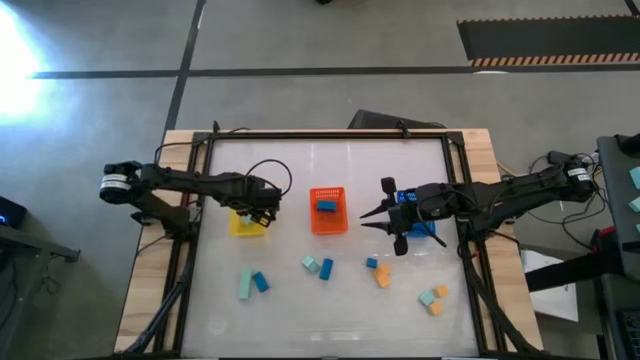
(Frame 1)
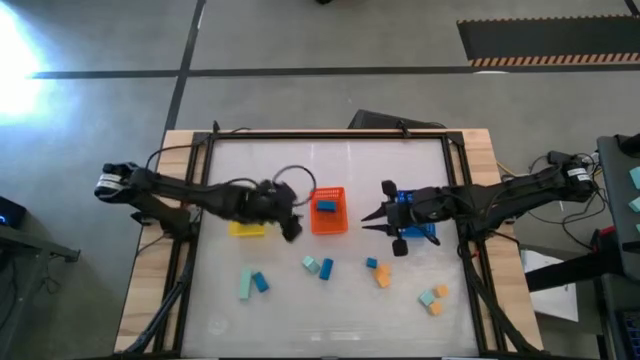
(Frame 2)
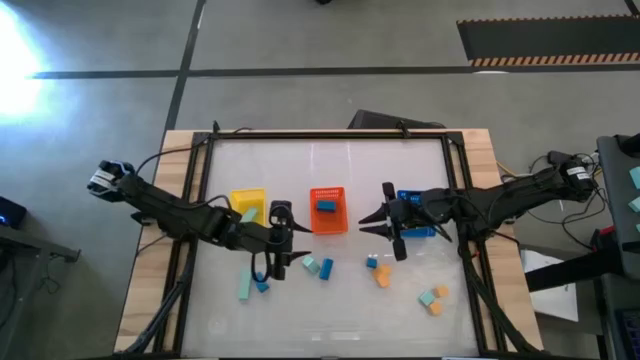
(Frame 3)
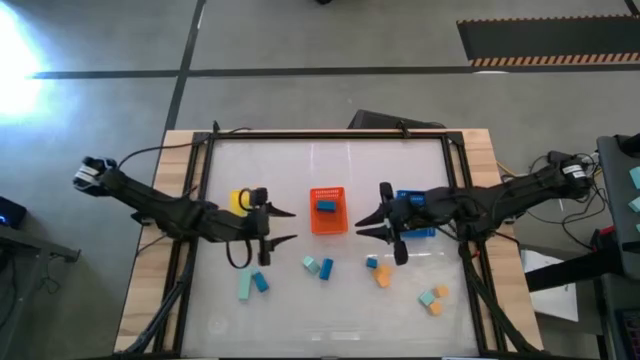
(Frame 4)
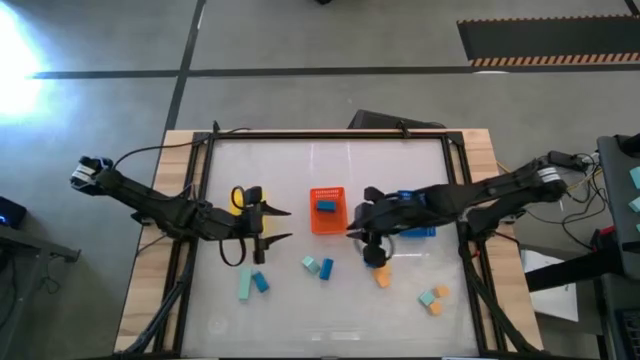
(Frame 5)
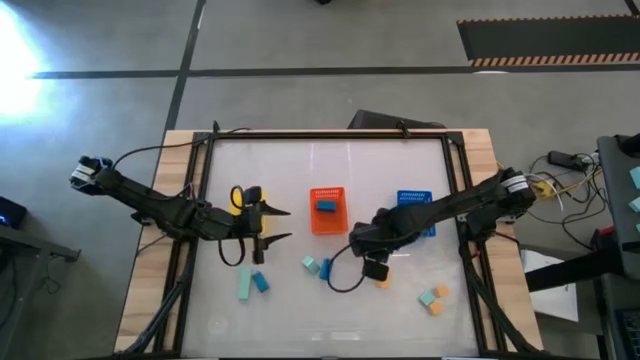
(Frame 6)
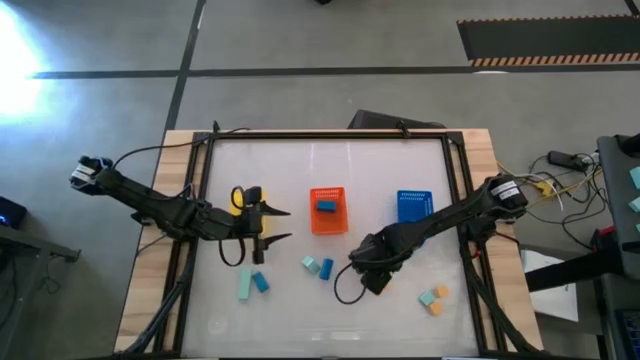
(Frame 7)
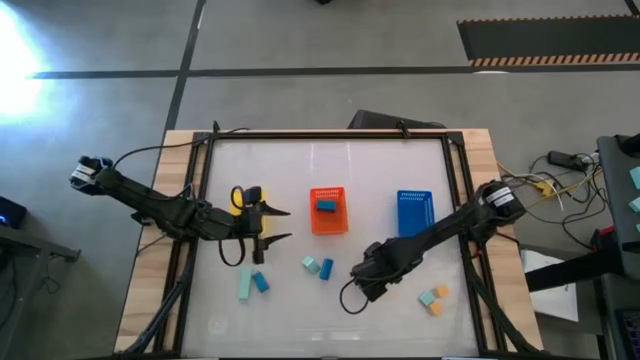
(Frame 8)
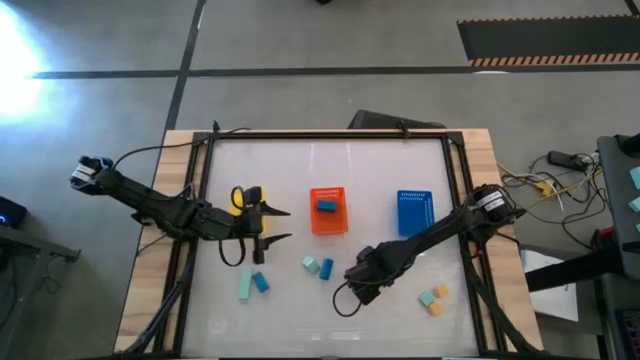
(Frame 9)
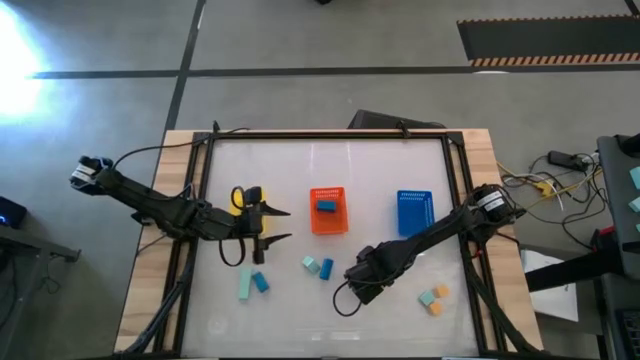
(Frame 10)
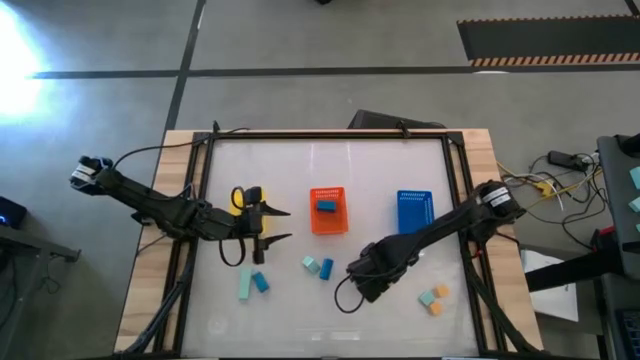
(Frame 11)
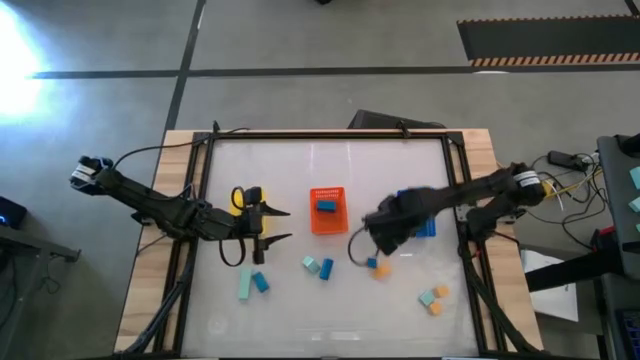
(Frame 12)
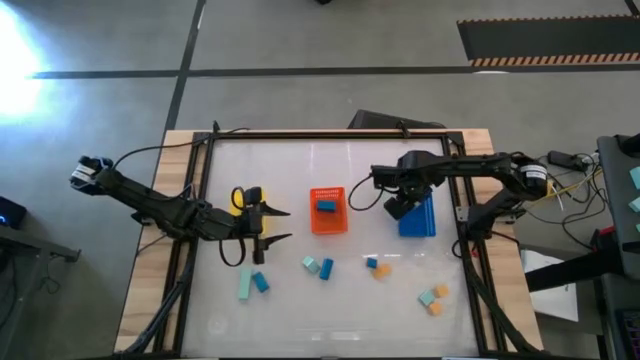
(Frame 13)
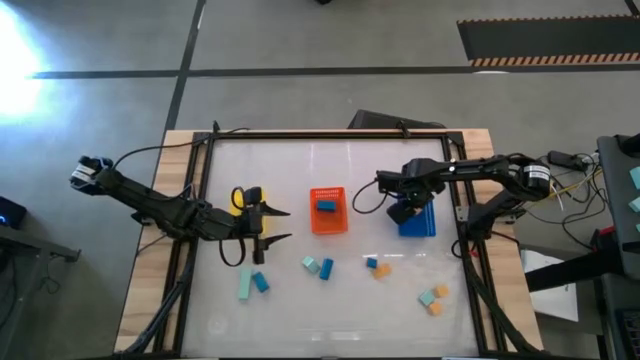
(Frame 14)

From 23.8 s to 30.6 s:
Task: Sort & place blocks by color
Put the yellow block into the blue bin

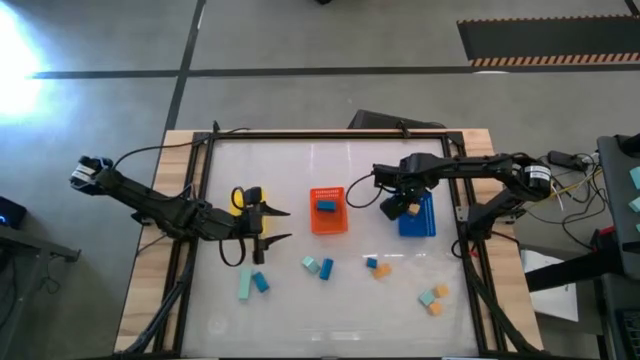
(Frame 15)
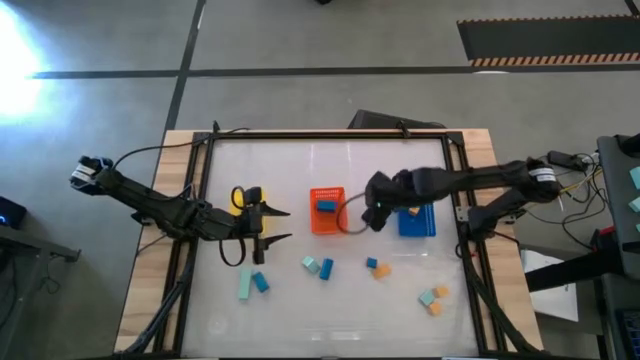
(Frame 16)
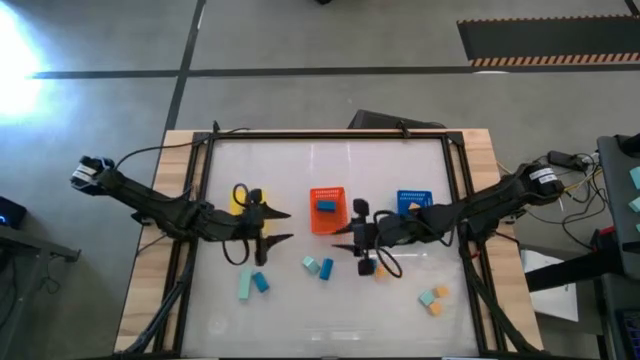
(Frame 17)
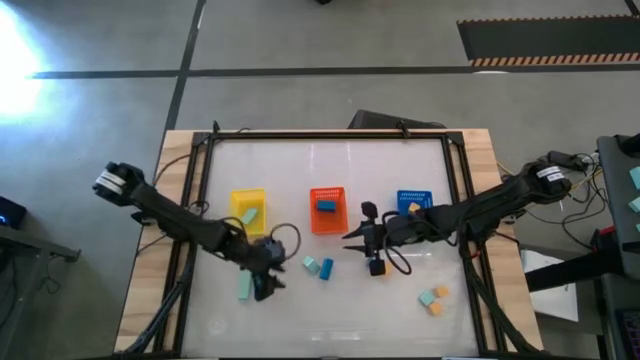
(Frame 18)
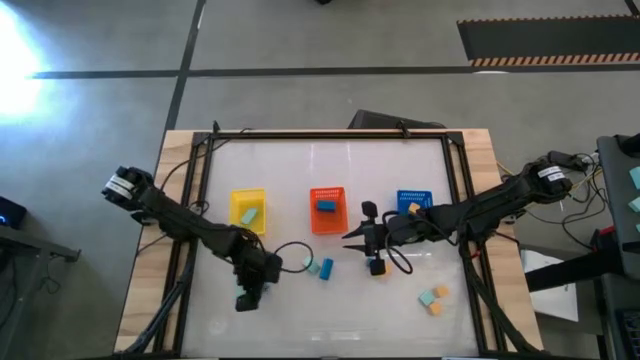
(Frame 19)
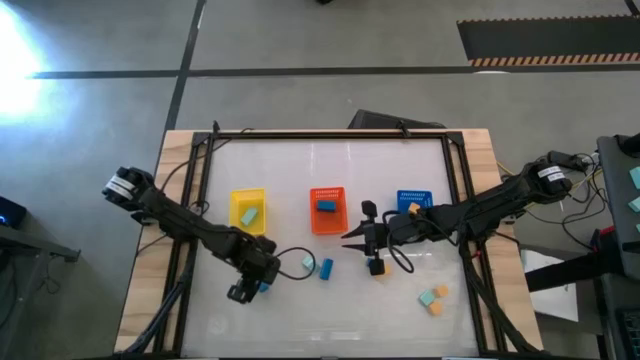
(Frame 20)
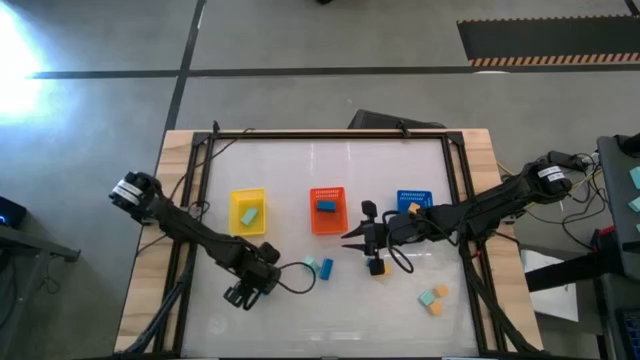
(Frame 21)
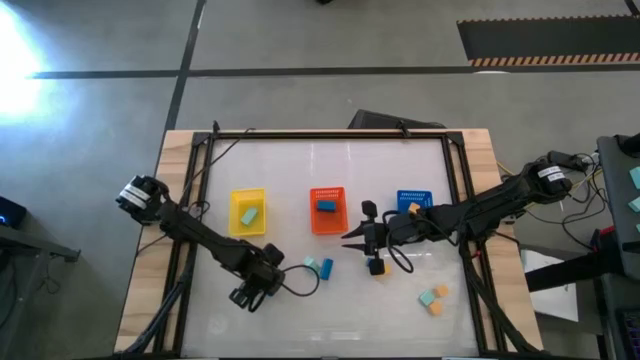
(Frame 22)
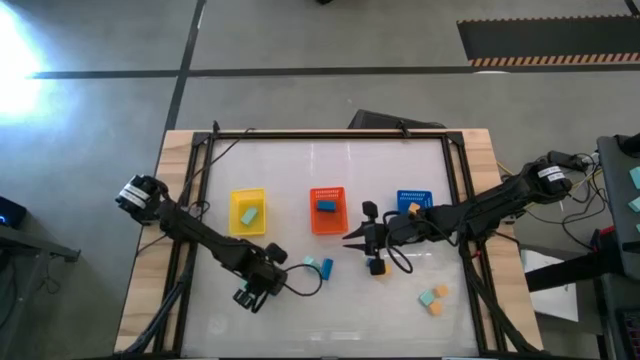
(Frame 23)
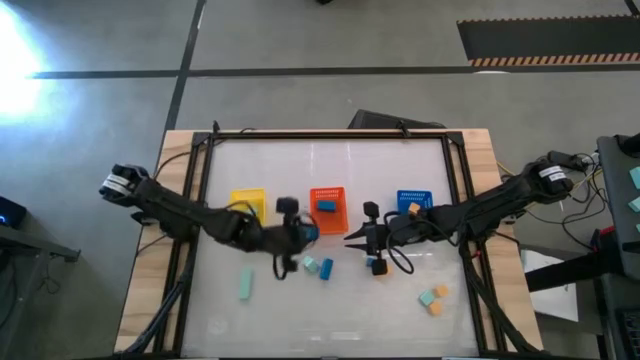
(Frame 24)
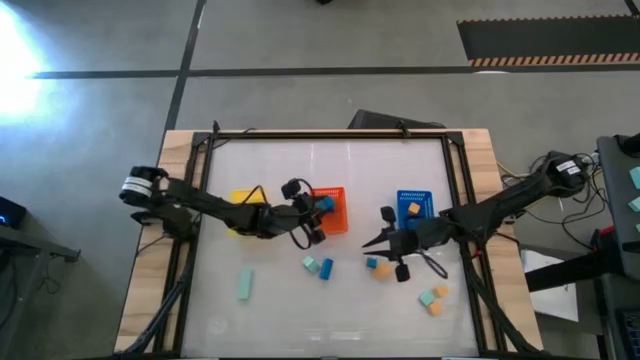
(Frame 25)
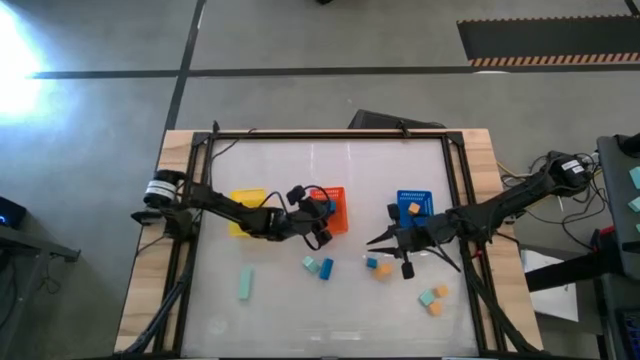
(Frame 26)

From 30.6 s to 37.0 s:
Put the blue block into the orange bin

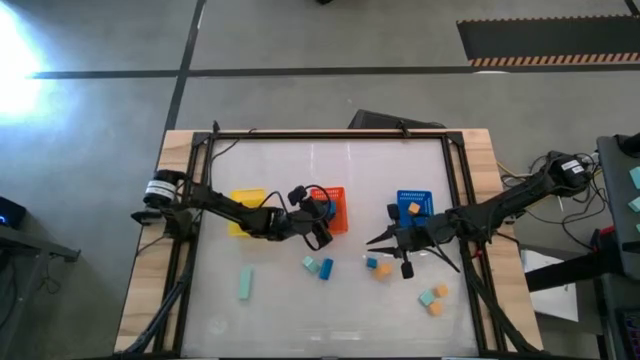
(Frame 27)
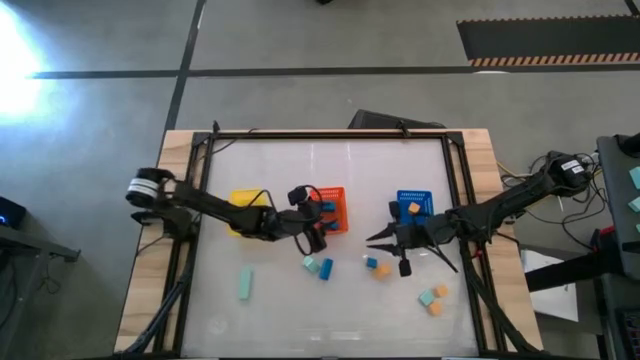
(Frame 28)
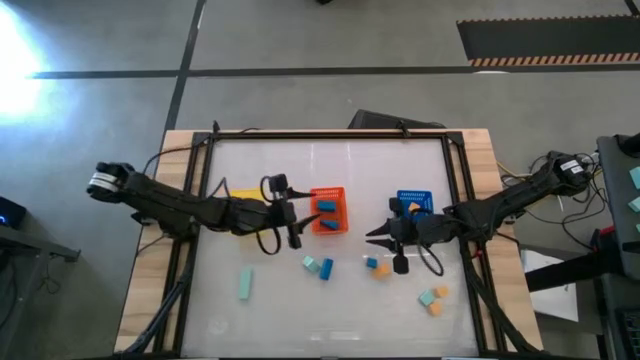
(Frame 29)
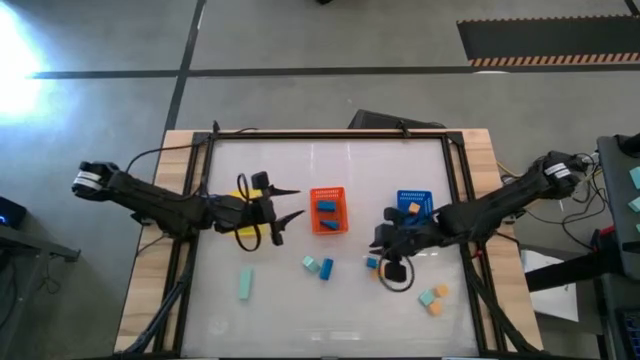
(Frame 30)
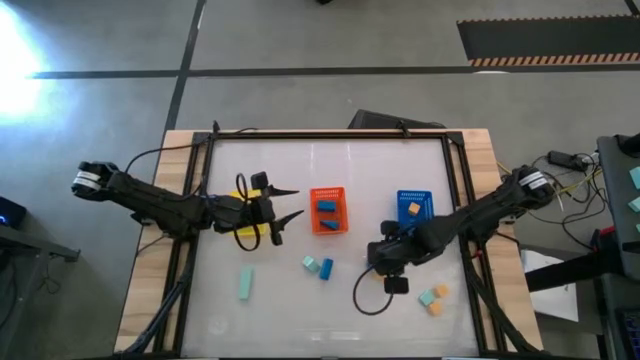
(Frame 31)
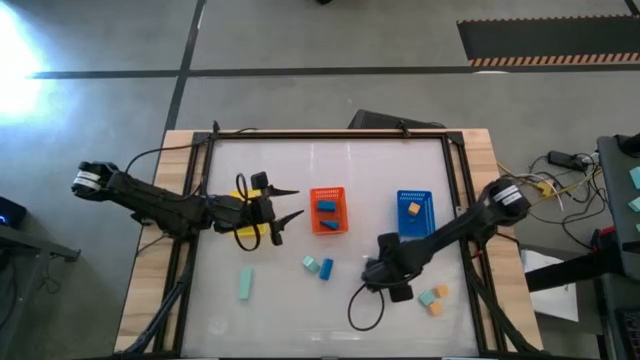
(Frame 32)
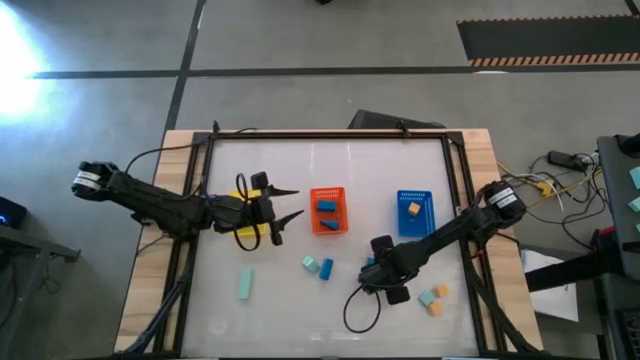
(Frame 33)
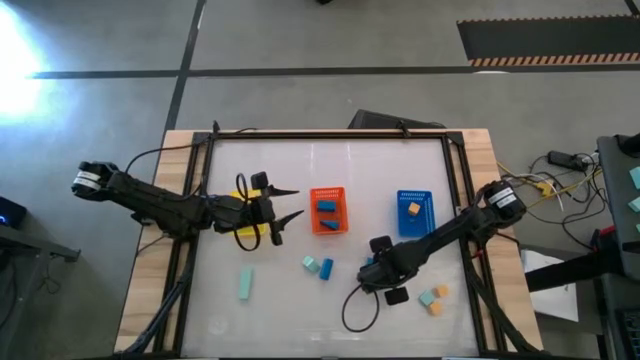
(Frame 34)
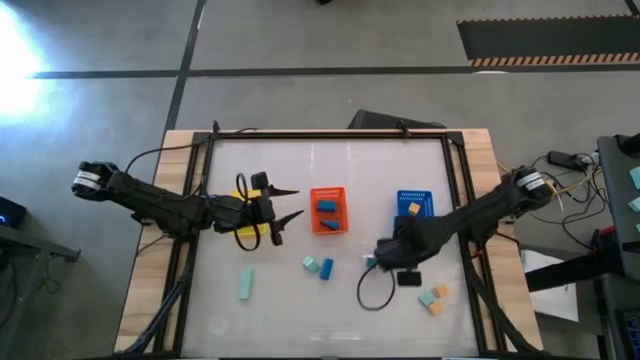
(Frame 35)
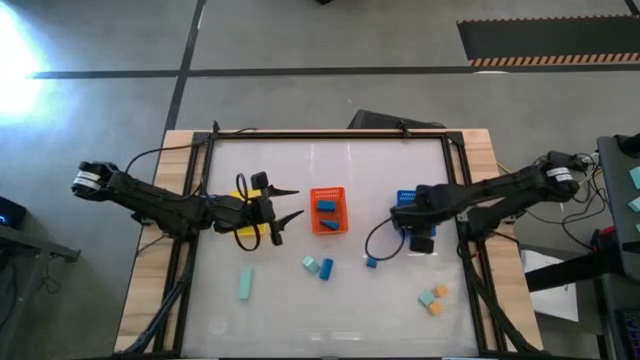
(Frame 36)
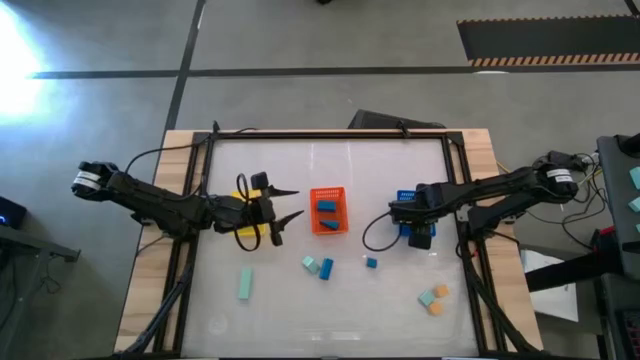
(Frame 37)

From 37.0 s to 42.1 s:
Put the yellow block into the blue bin

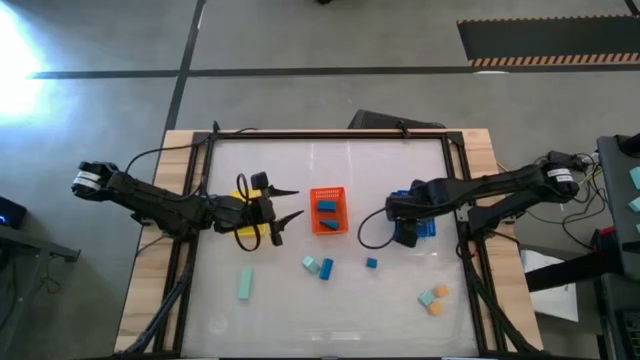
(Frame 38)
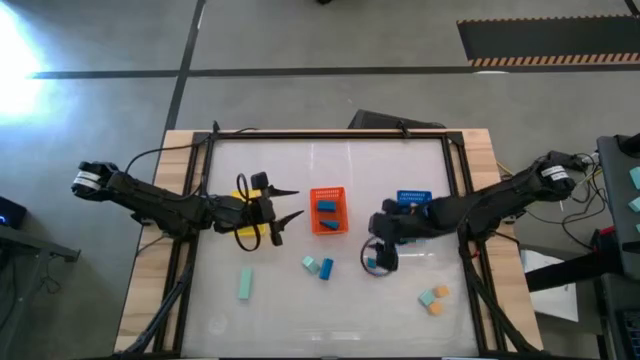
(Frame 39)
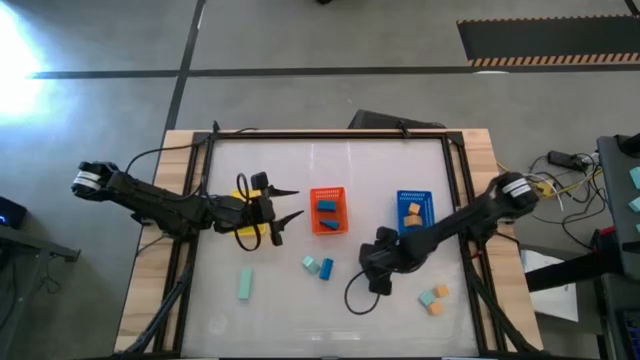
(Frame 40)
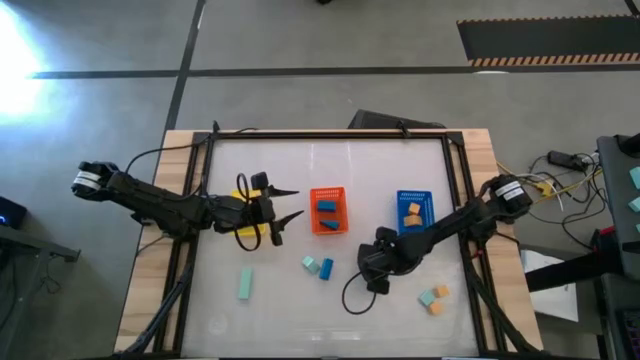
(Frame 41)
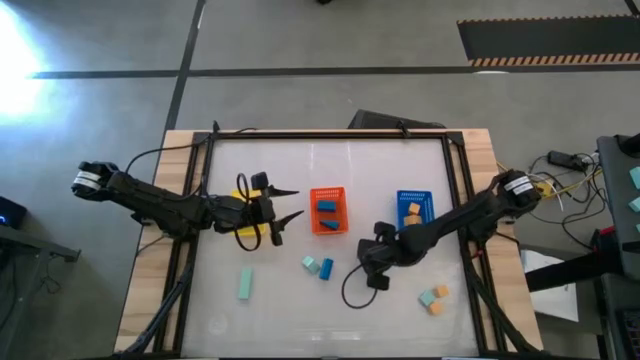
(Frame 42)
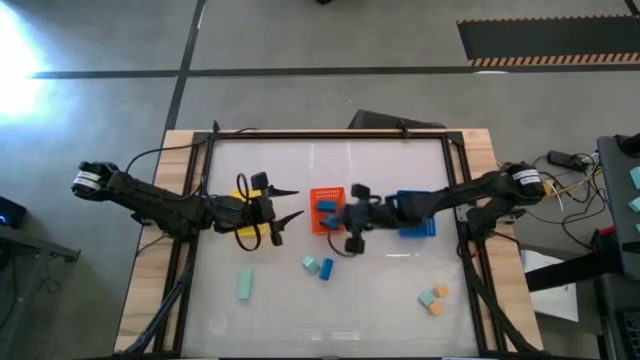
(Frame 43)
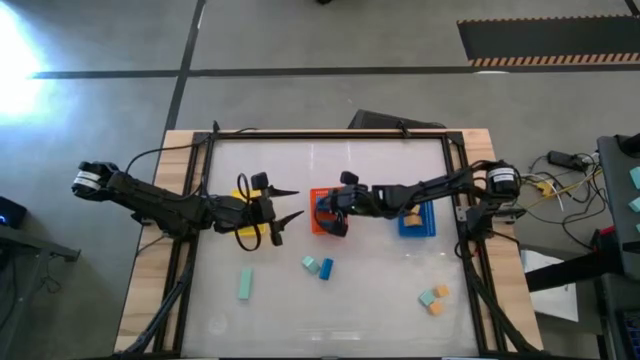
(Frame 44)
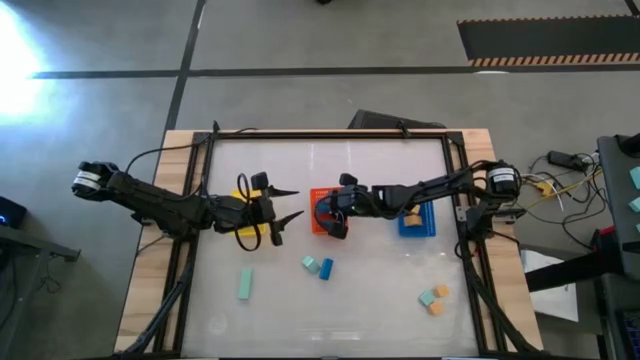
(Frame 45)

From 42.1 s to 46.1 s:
Put the blue block into the orange bin
